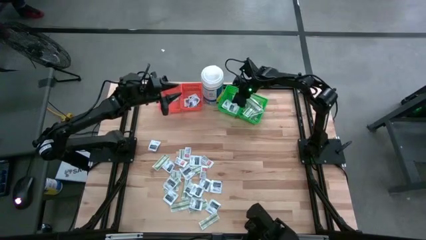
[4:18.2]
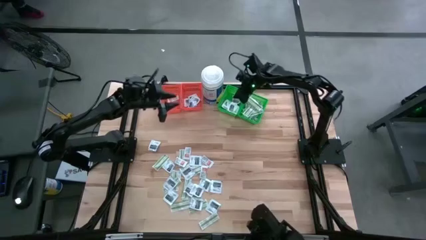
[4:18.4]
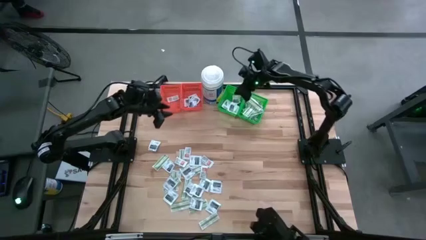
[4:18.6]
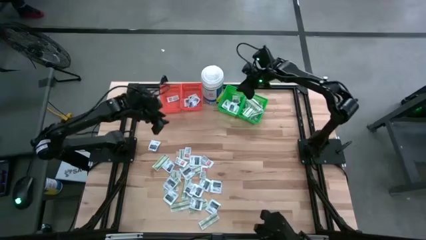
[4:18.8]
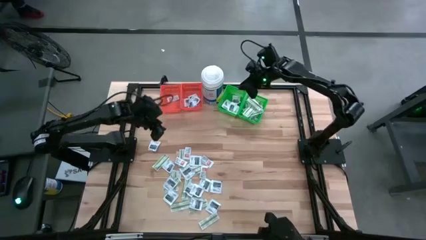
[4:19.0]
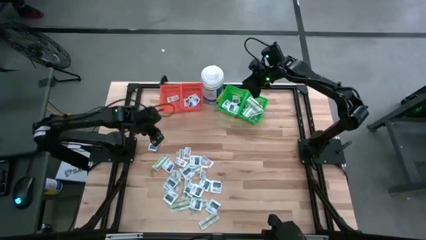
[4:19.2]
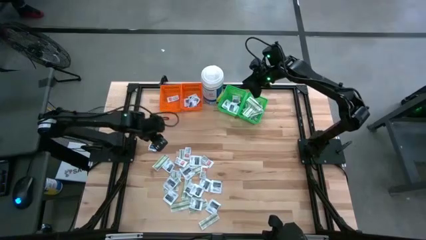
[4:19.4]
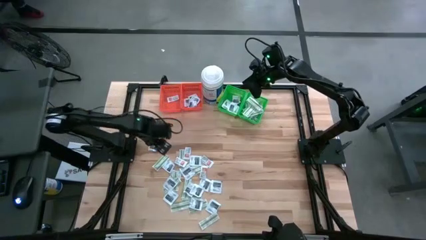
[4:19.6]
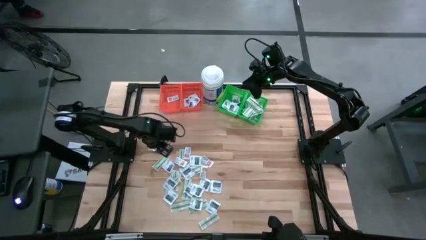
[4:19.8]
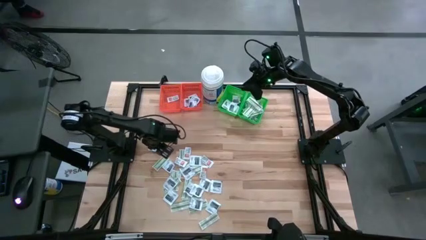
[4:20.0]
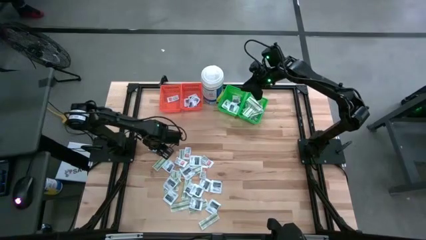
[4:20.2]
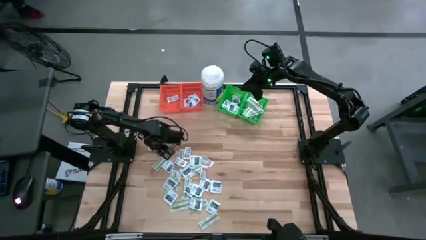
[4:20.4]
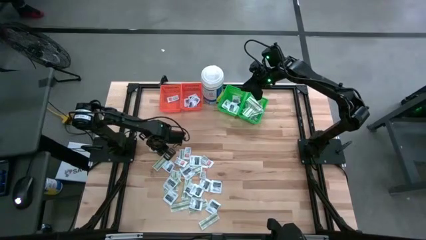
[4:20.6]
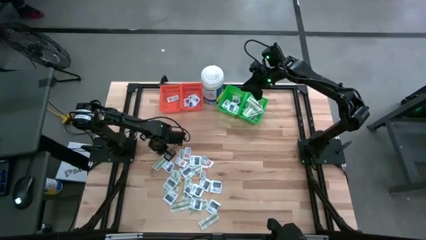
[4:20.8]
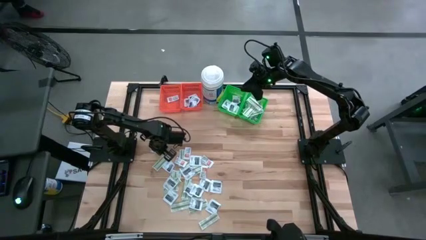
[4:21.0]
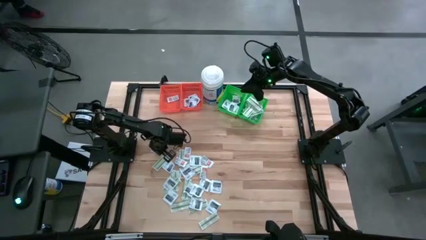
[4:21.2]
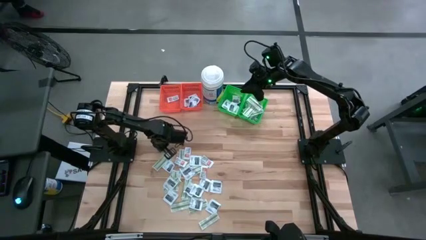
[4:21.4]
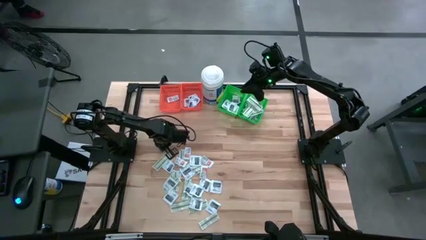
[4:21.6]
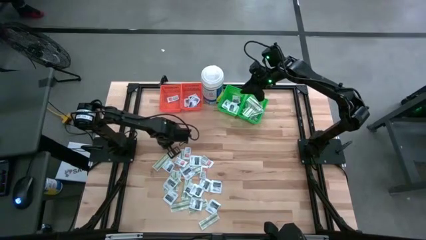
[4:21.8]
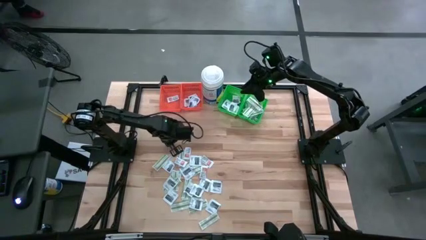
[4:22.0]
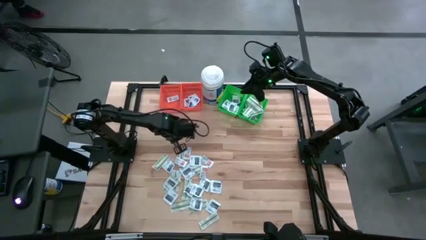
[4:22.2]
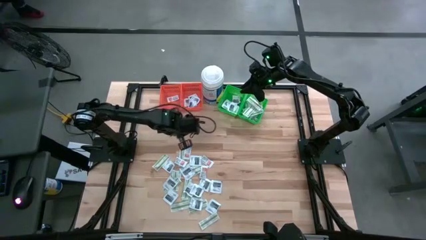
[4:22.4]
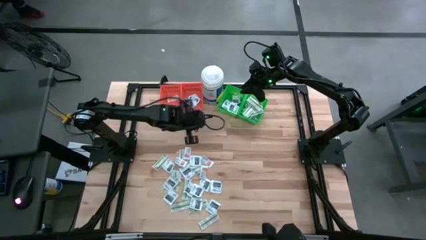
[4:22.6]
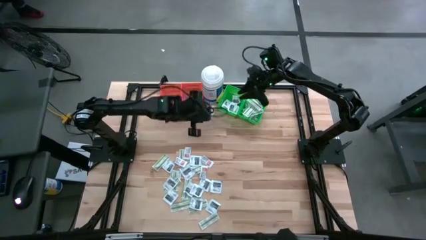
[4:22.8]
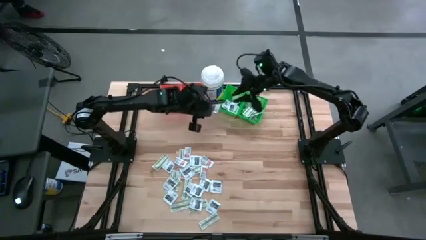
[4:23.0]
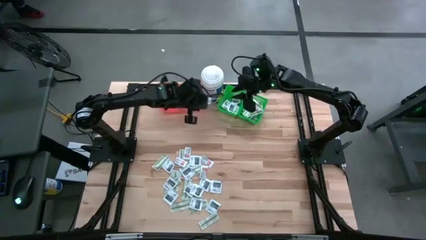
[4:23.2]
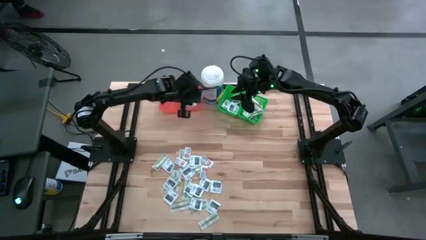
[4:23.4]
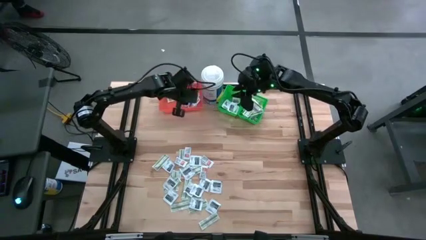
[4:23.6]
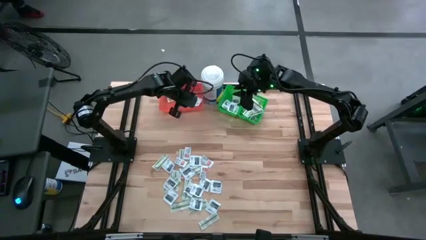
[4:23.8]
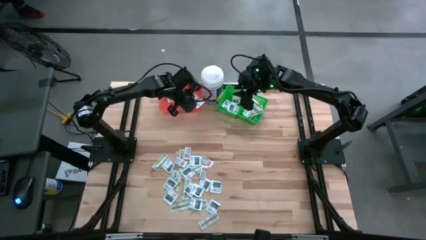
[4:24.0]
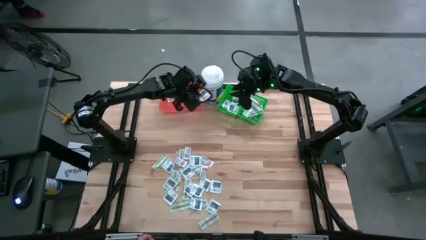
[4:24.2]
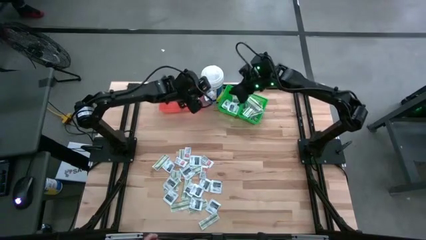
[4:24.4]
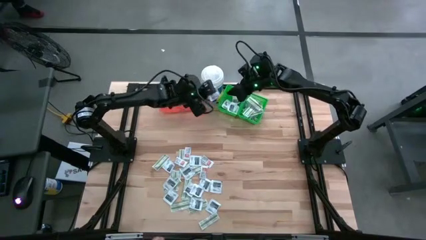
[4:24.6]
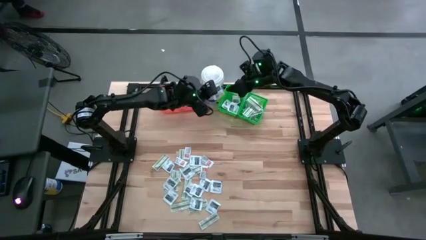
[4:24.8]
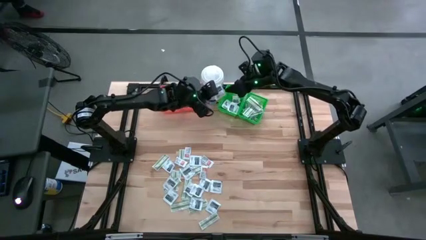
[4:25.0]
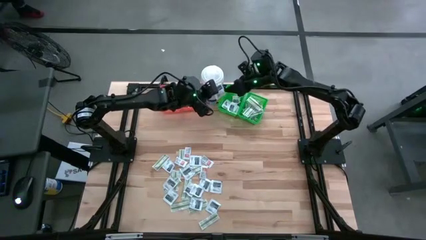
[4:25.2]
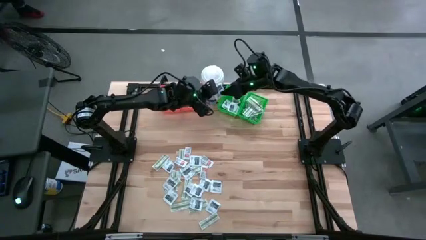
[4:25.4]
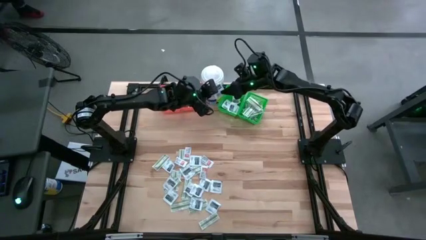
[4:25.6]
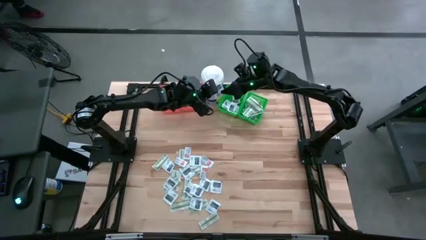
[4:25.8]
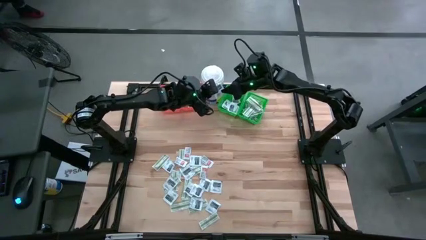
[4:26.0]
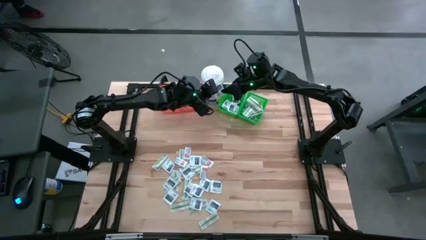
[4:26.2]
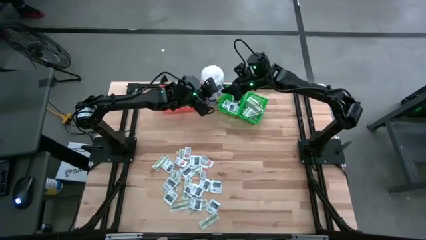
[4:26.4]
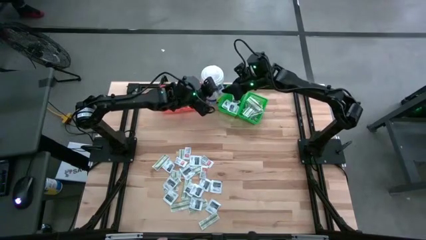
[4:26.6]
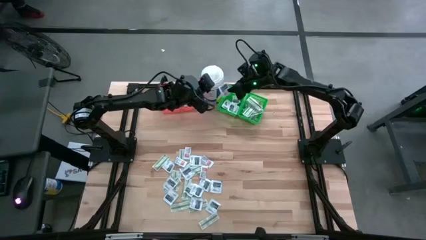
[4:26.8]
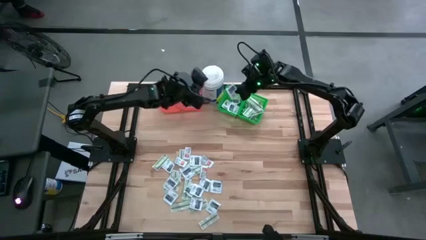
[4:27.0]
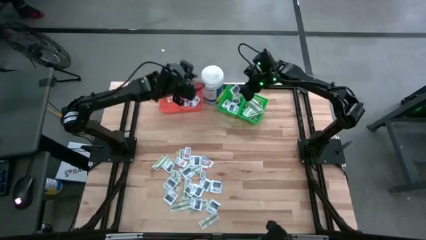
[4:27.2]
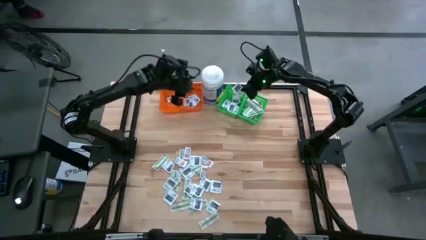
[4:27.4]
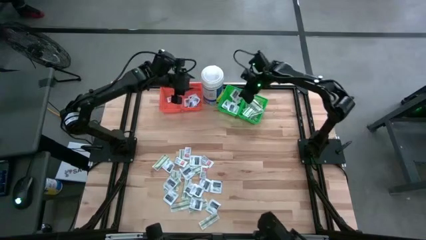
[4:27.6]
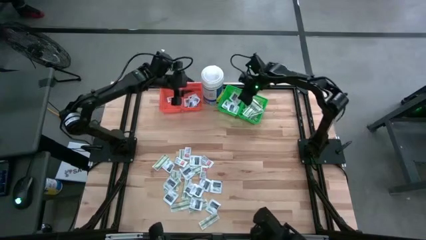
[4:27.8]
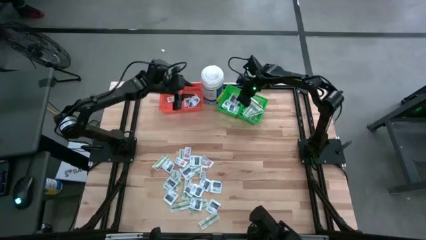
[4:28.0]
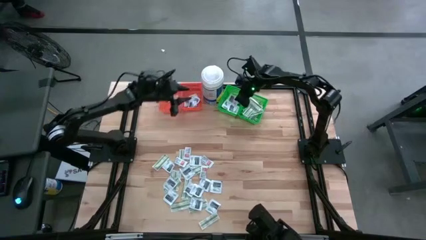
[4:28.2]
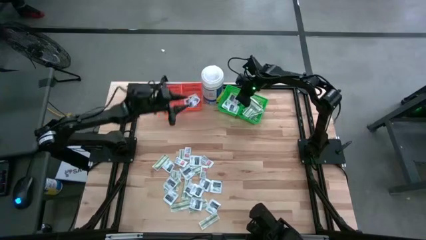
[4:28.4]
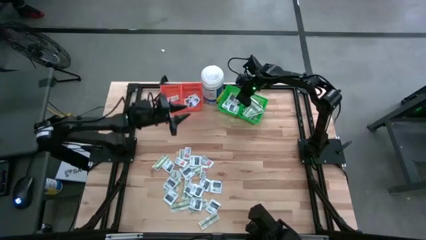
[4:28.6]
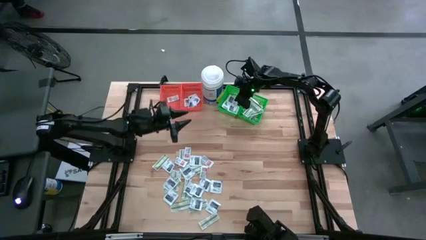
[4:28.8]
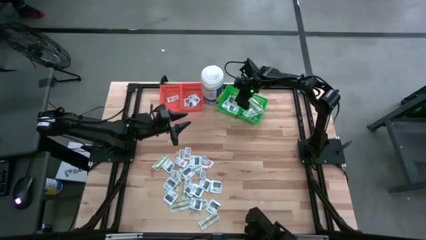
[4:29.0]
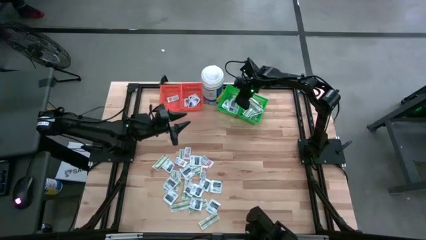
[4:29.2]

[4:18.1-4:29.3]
Task: Pick & Place First Aid Supplies
Put the black towelette pack into the left green bin

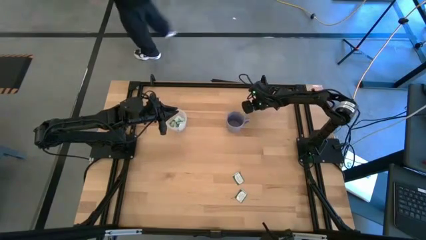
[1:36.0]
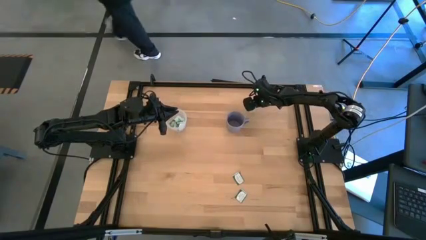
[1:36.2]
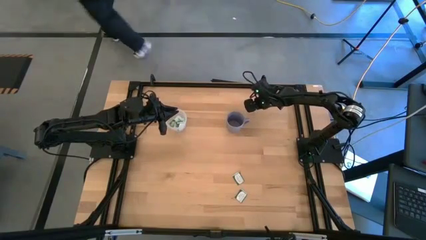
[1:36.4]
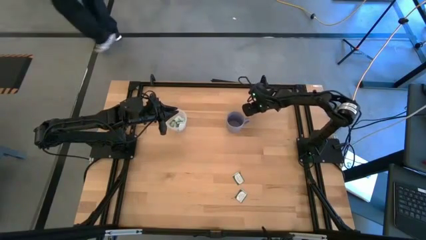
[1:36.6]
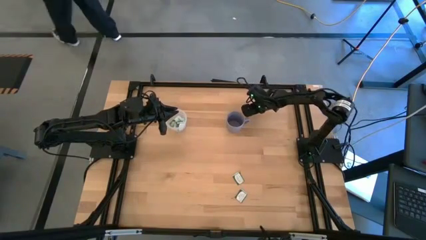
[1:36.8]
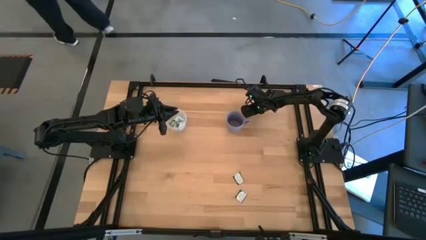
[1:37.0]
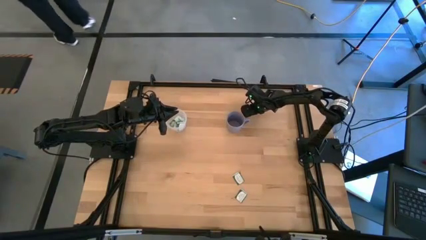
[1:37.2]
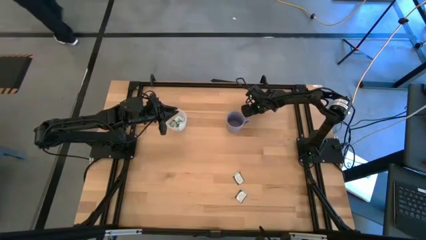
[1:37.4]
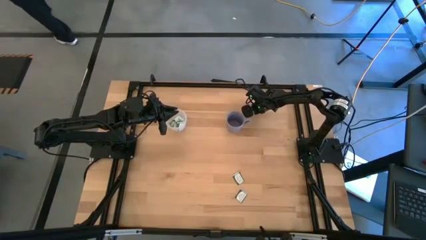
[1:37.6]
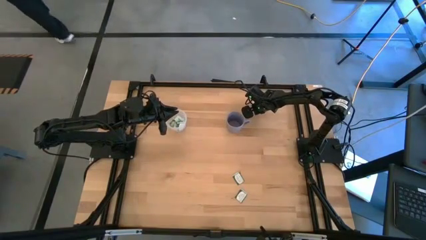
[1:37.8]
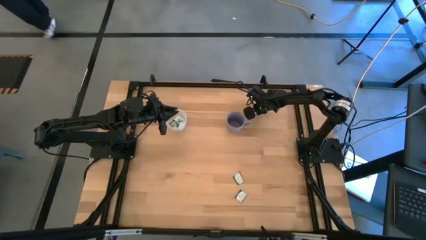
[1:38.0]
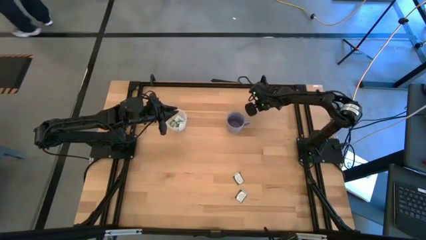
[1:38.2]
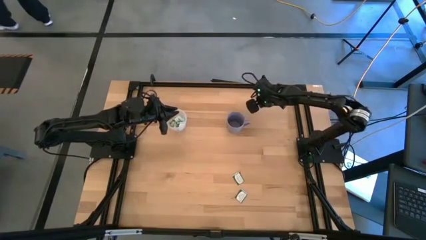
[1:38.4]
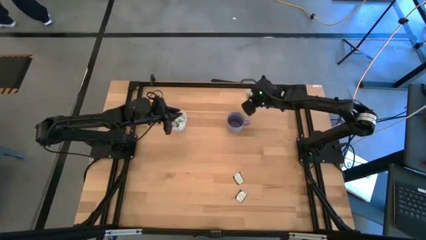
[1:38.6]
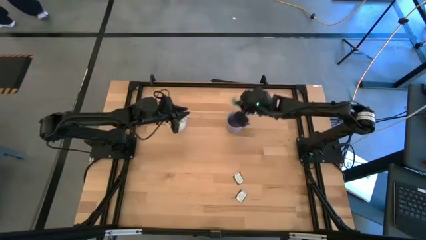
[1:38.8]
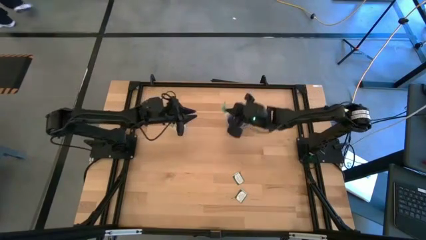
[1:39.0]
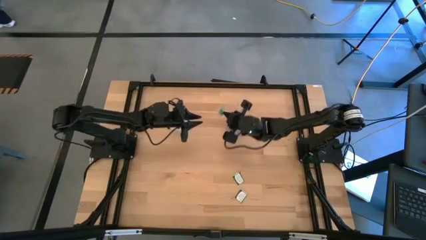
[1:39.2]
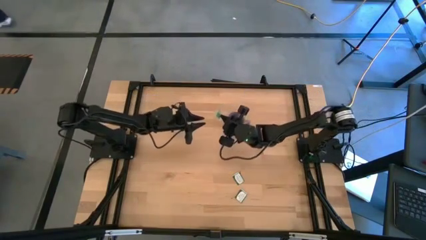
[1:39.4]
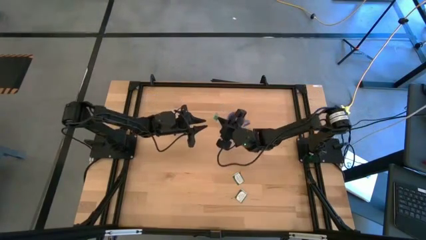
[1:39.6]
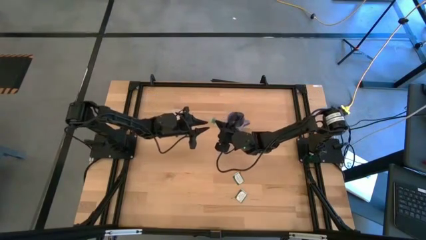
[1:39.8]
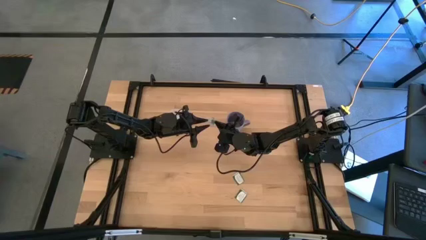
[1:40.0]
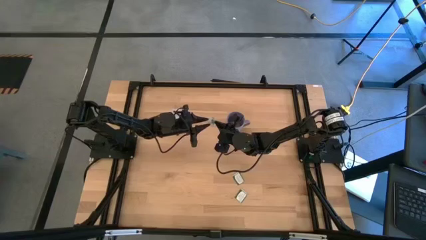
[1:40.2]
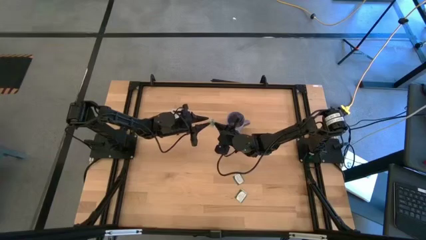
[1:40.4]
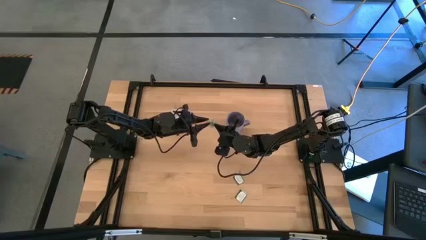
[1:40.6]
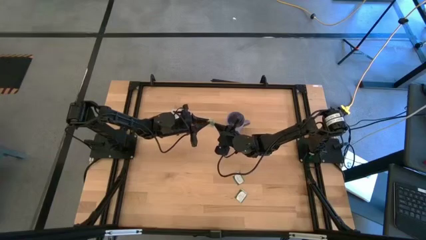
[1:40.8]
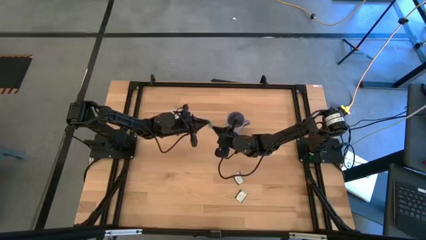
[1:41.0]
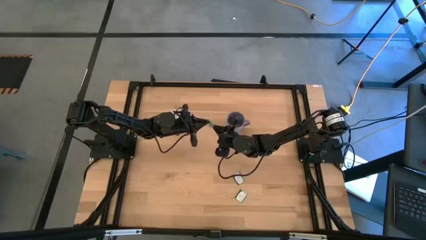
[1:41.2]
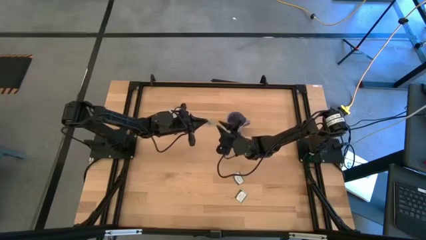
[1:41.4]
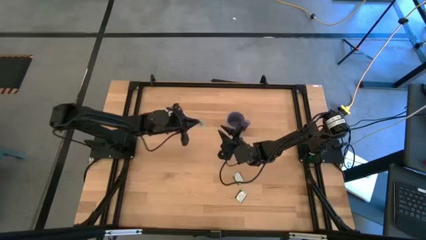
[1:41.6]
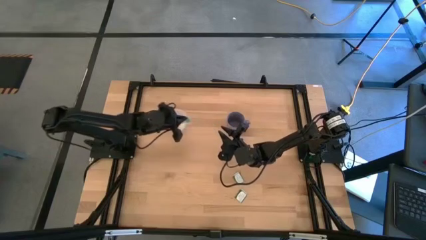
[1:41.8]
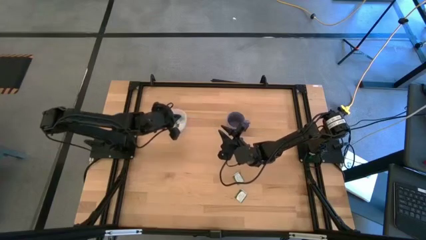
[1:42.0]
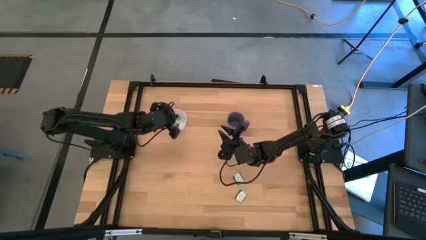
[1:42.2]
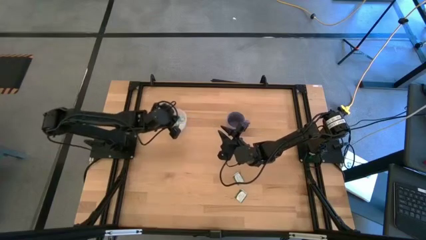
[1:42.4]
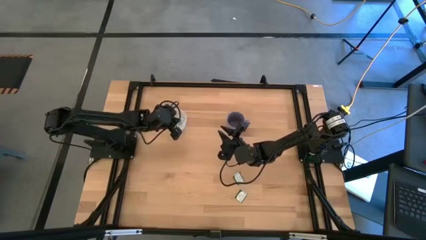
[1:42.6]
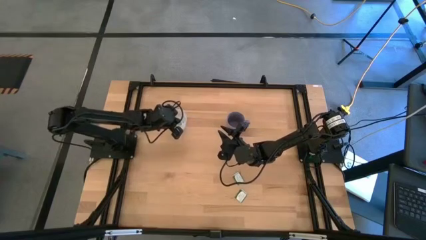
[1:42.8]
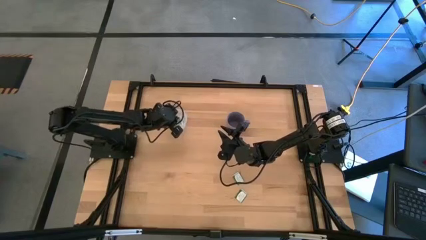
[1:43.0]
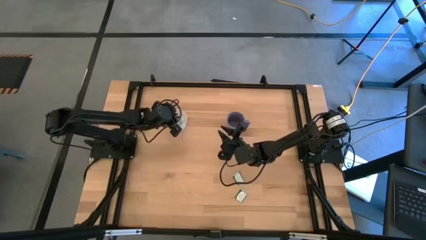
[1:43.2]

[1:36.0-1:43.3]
Task: Pick and place Stevia / Truvia into bins
Put the light green stevia packet into the transparent container
